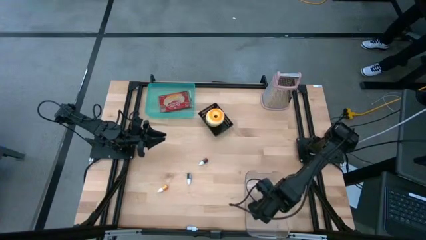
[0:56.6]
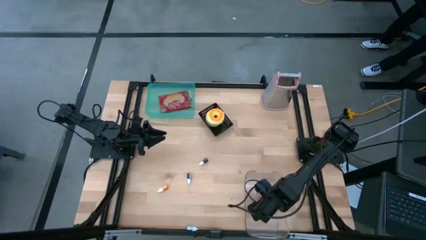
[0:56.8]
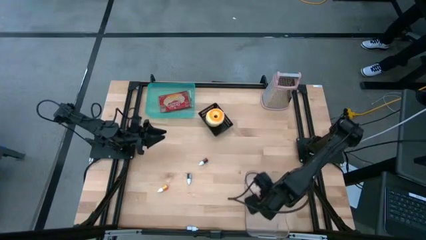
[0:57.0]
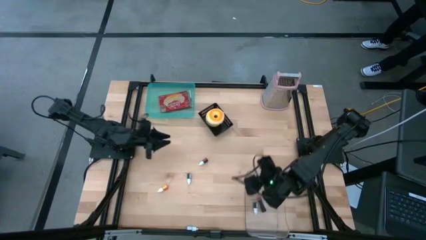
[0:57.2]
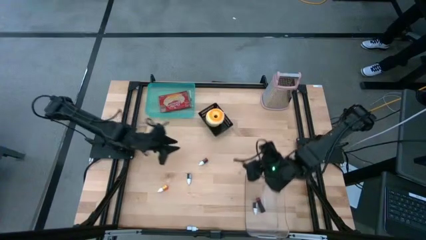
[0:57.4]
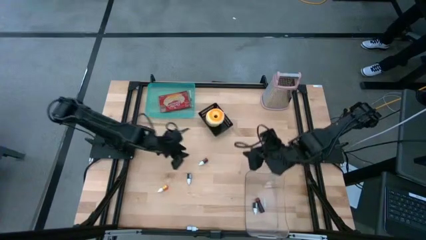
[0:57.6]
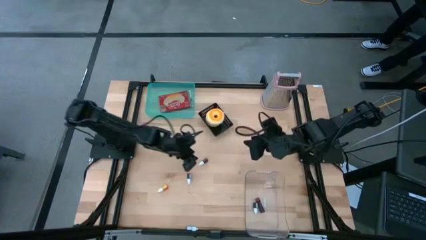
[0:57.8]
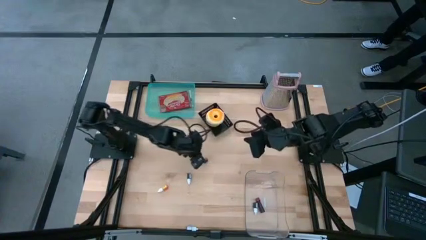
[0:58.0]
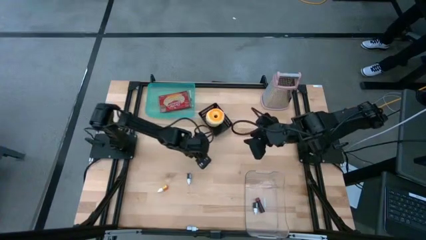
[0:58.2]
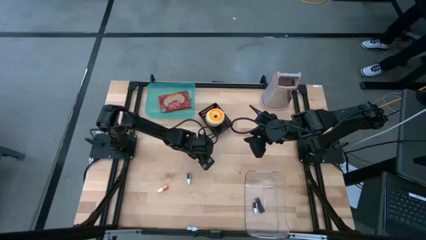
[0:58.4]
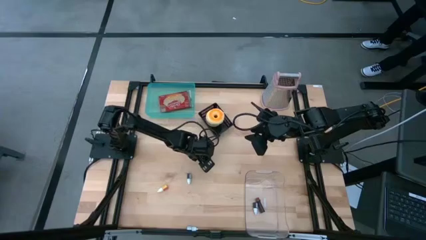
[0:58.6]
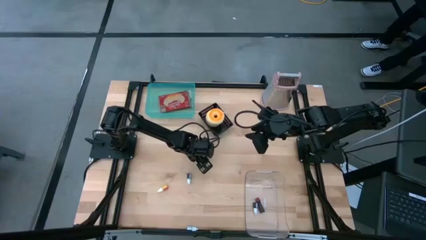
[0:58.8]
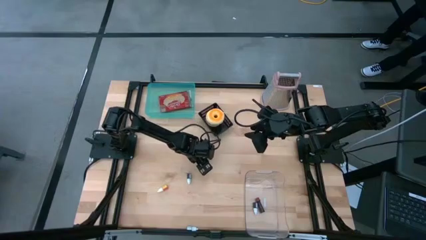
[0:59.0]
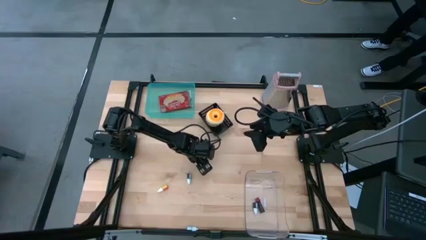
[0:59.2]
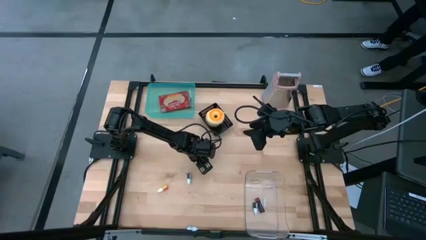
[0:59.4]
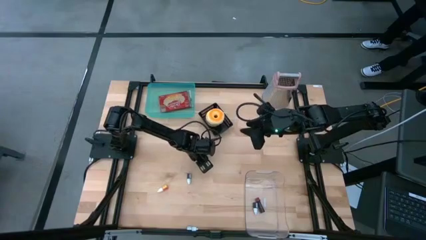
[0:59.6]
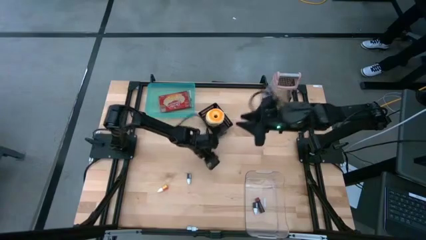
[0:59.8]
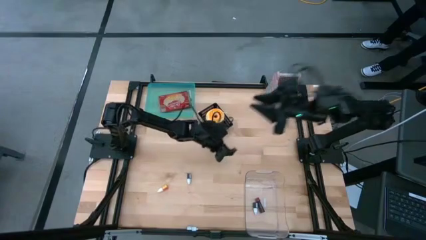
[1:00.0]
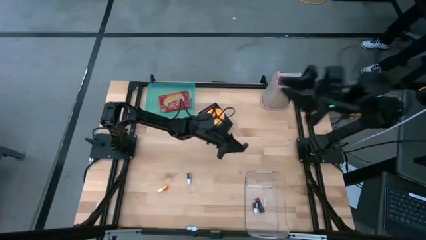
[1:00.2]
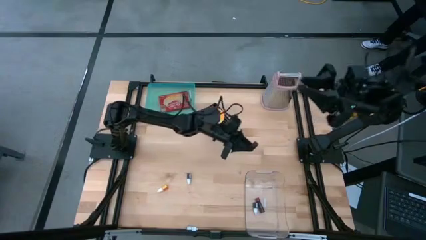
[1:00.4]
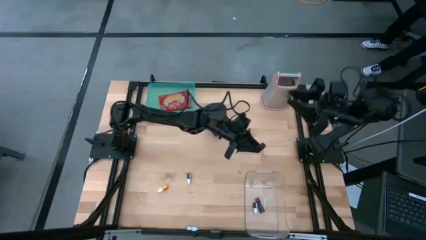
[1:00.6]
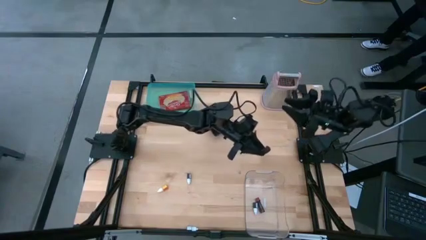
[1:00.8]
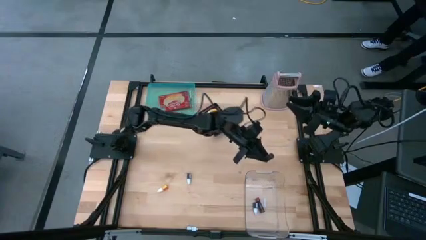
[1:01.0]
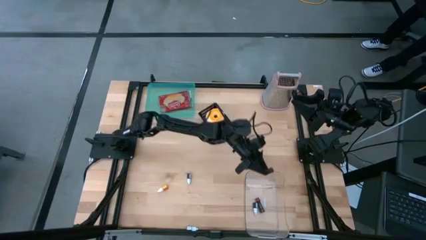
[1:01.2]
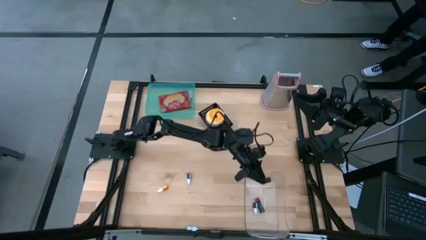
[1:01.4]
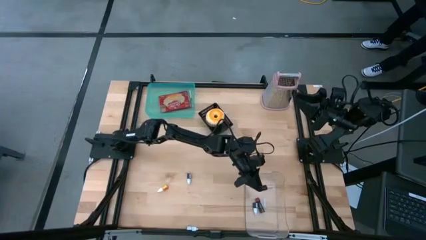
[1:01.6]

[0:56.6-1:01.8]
Put the red food coloring bottle into the transparent bin

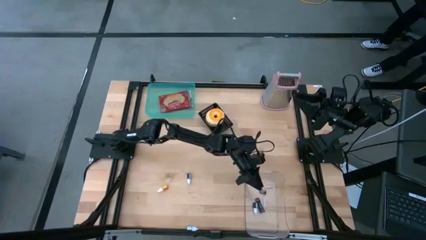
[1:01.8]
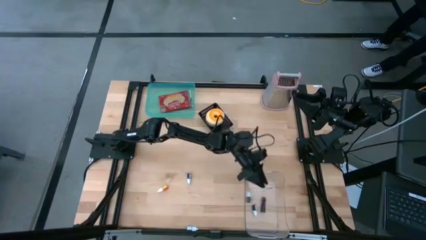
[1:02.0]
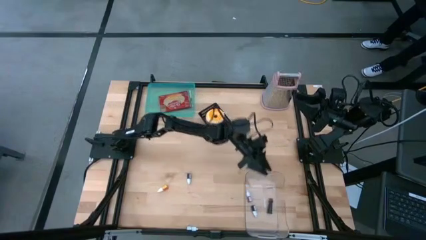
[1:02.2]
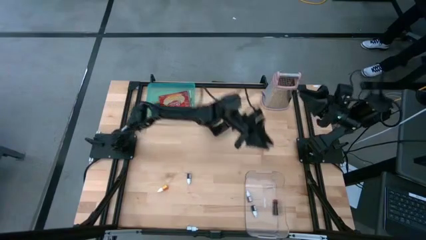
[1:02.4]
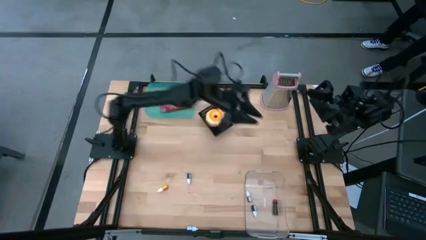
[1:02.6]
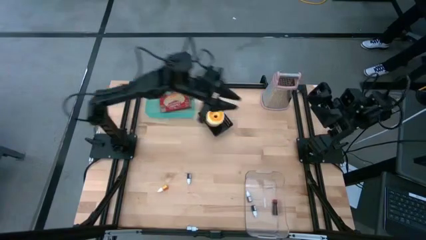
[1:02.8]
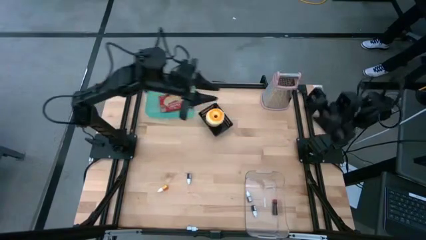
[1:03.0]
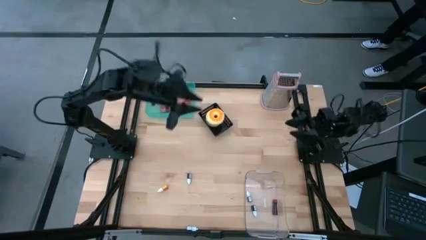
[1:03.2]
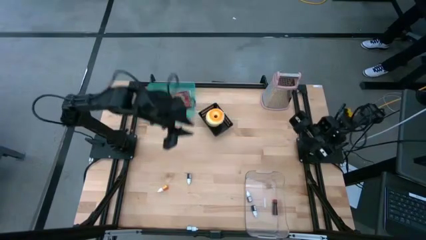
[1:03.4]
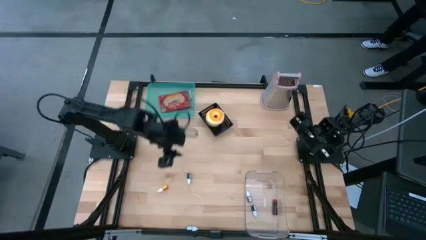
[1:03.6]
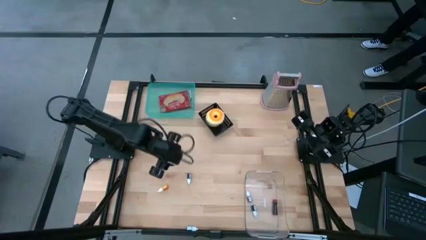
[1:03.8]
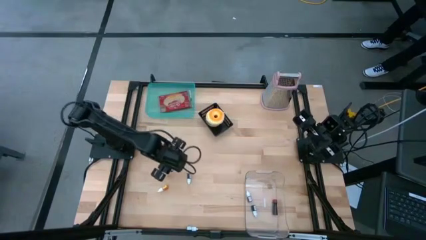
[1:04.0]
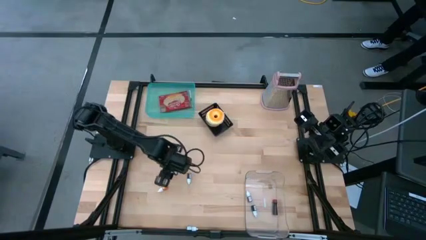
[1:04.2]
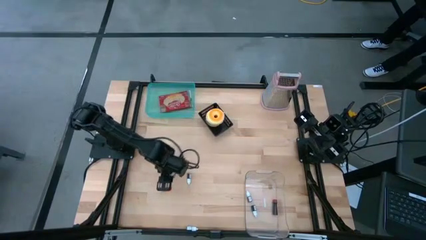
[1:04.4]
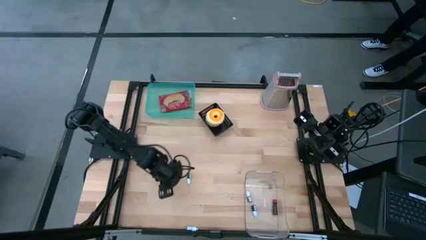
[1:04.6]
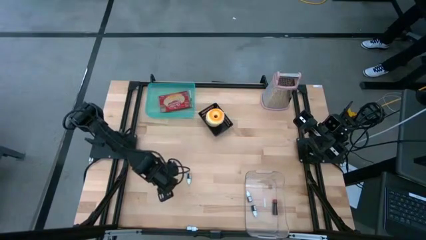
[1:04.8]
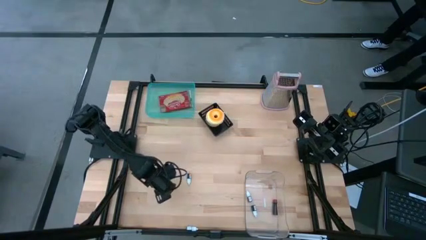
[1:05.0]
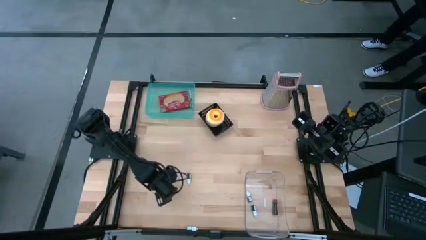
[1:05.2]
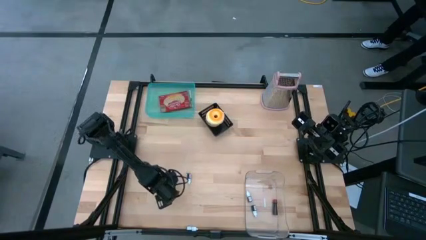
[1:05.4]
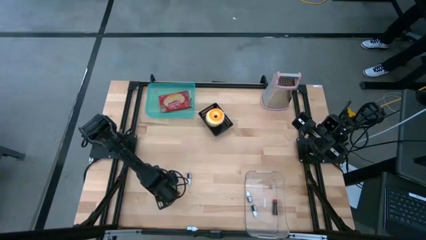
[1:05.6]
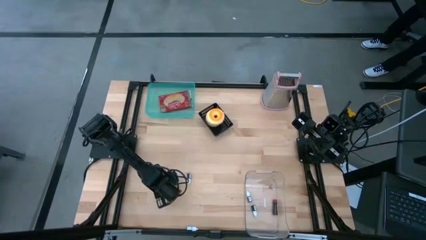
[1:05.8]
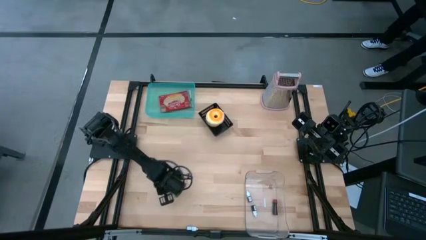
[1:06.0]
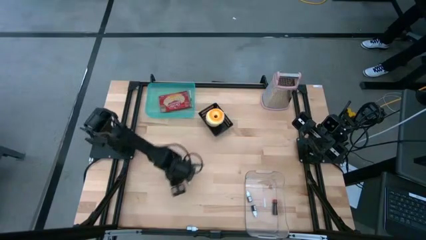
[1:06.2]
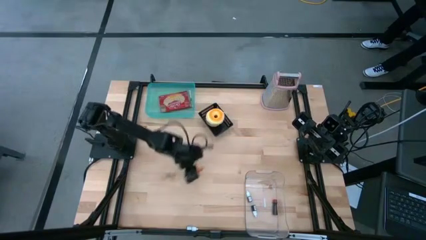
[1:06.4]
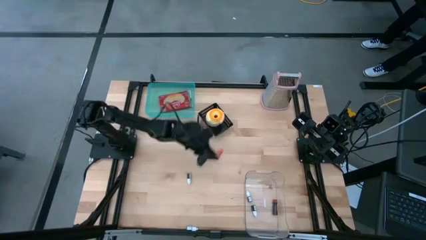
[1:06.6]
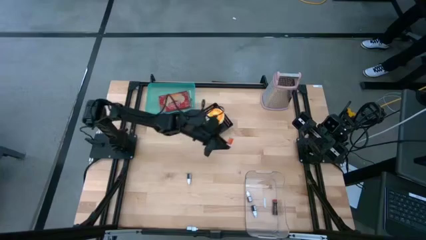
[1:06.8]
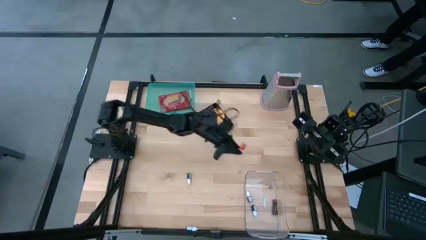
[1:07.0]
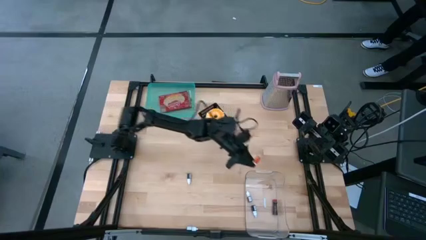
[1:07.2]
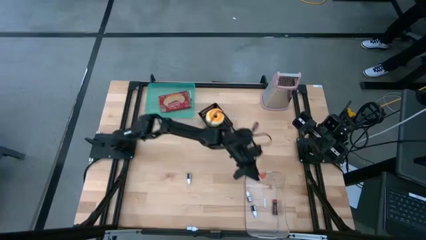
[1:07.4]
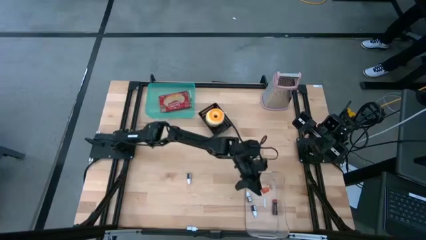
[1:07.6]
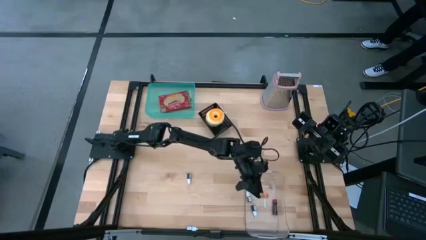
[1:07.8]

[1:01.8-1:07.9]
Put the yellow food coloring bottle into the transparent bin

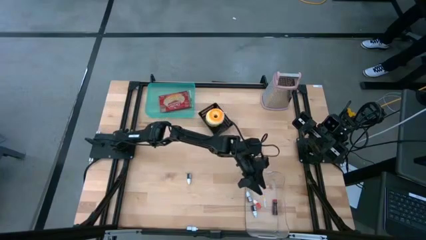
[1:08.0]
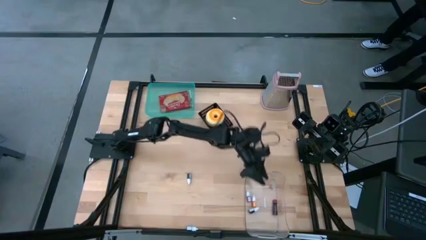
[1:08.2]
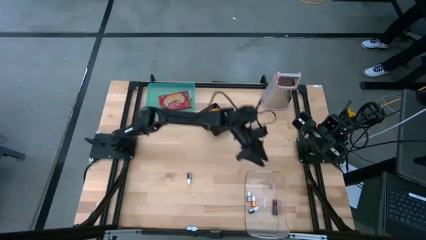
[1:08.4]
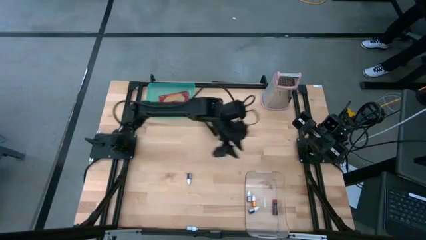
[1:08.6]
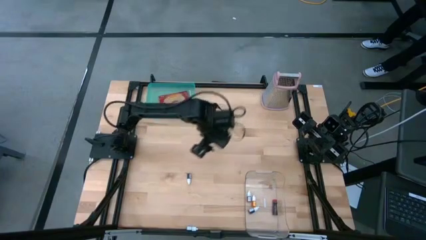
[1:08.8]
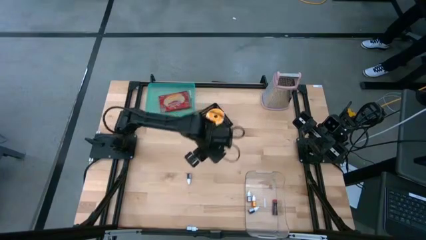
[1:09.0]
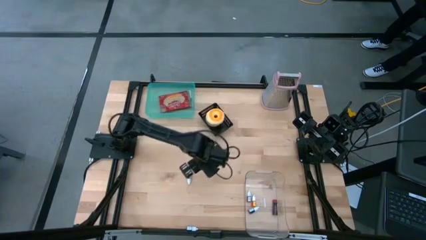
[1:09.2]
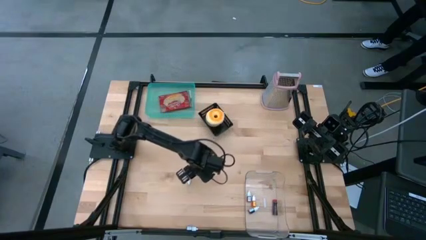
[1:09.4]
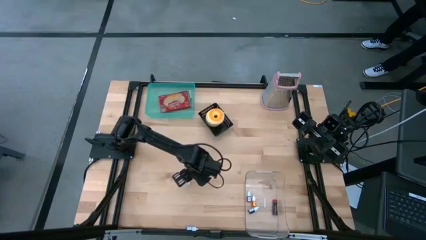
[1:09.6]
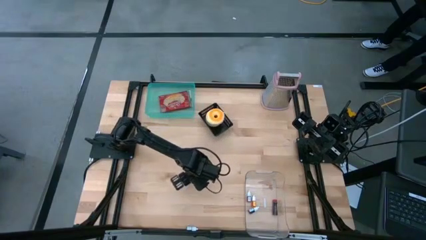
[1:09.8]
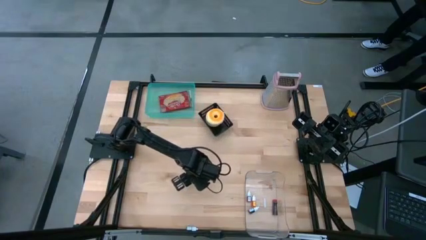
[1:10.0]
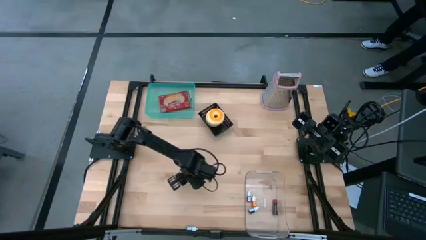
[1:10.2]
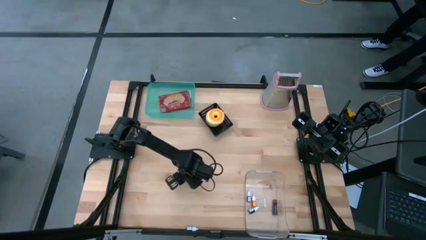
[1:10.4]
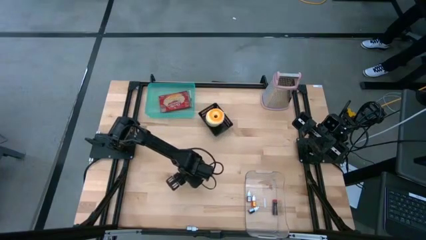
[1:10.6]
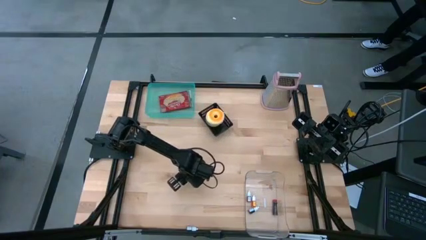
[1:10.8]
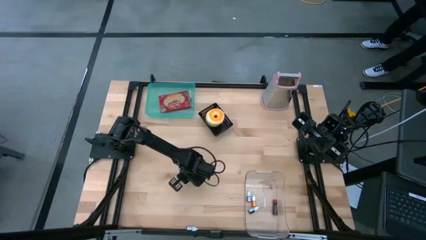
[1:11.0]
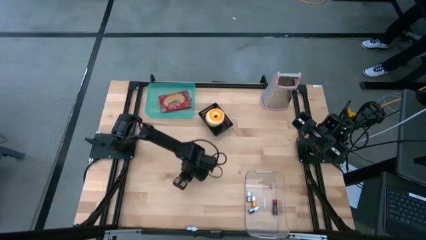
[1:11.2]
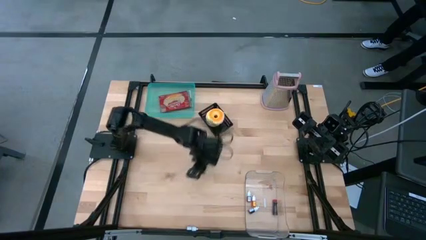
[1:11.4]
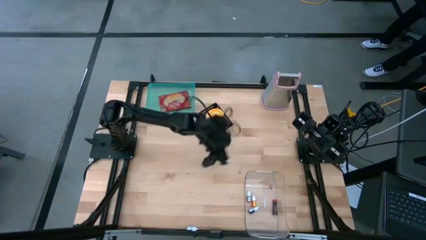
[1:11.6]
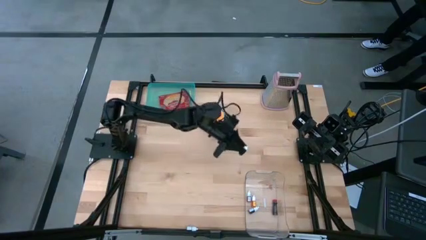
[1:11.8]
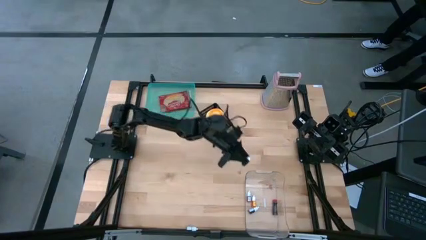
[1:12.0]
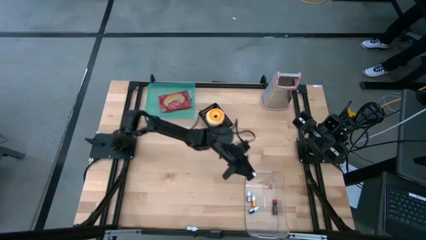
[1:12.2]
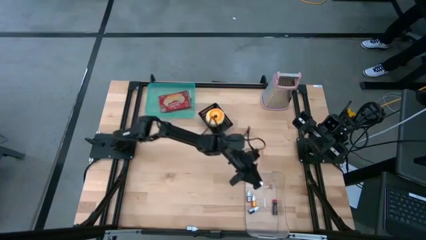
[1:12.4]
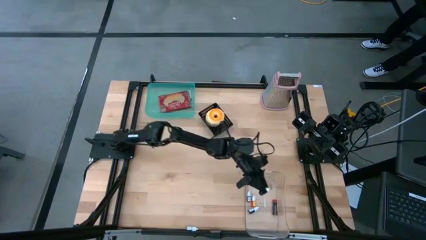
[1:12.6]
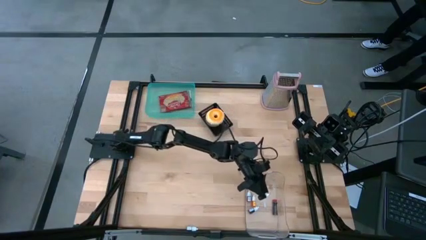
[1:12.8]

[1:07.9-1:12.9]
Put the green food coloring bottle into the transparent bin
